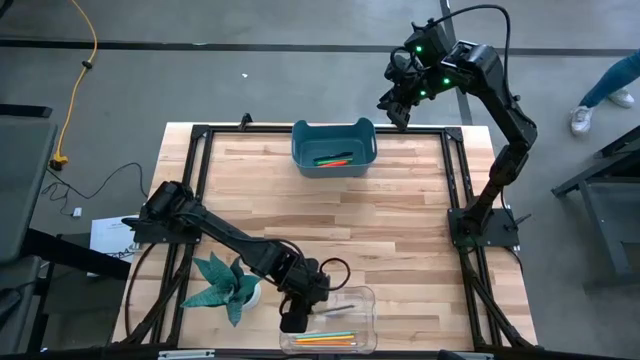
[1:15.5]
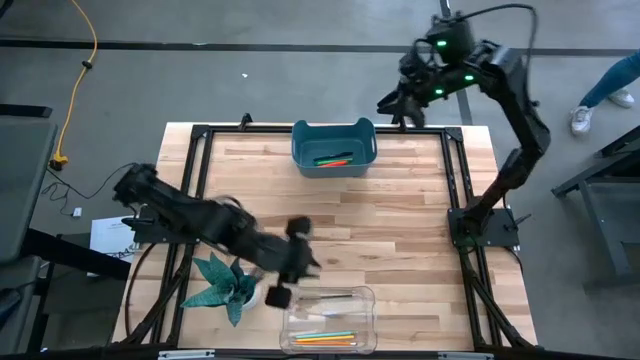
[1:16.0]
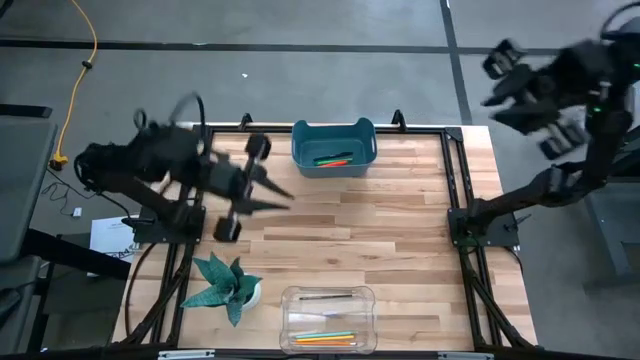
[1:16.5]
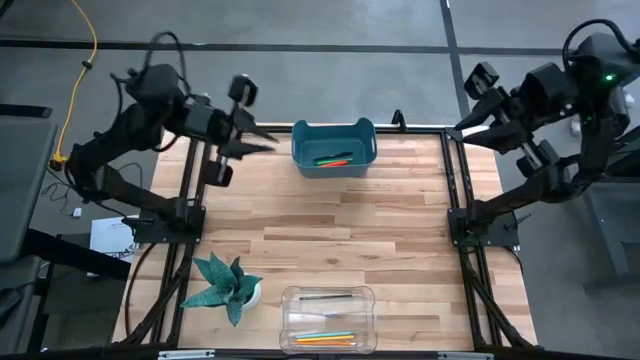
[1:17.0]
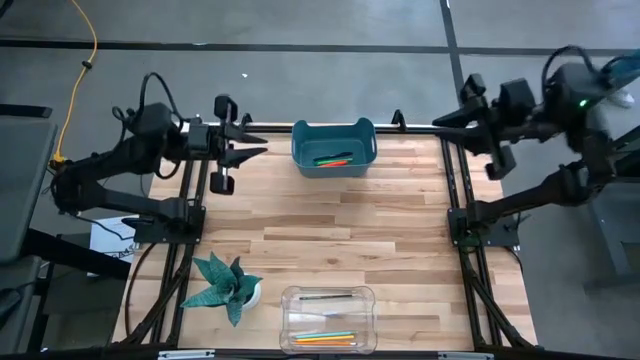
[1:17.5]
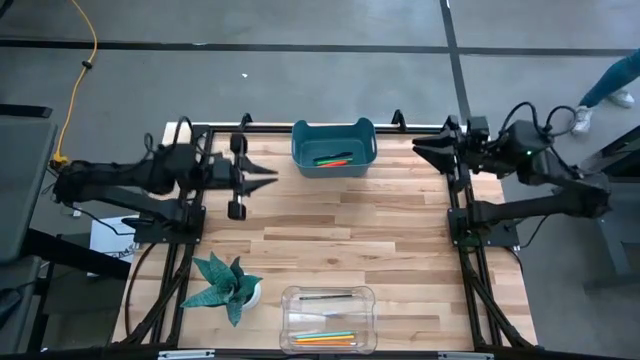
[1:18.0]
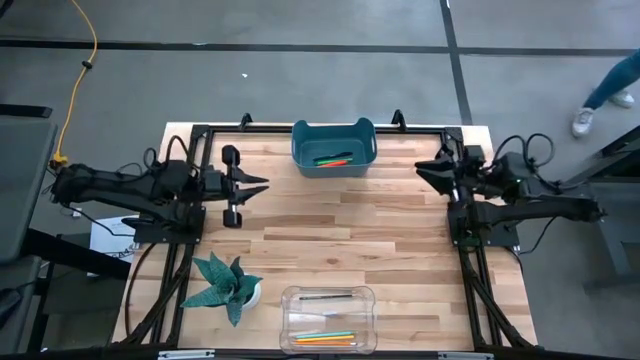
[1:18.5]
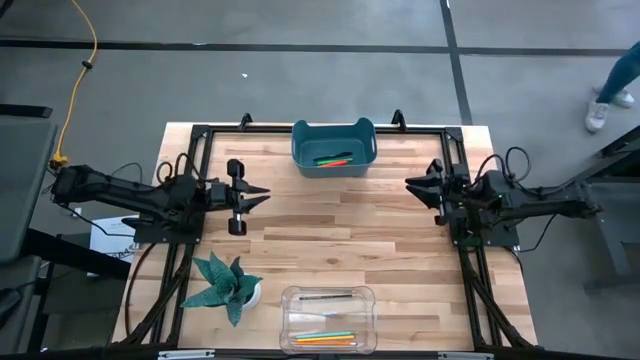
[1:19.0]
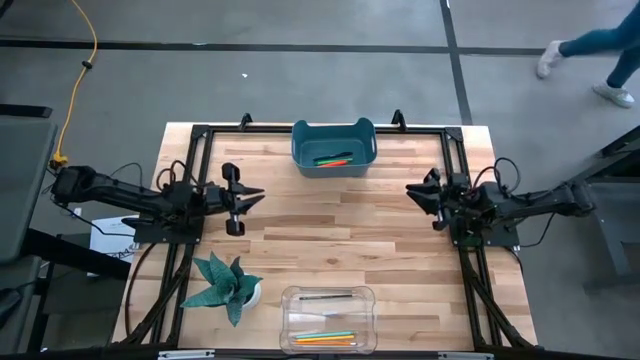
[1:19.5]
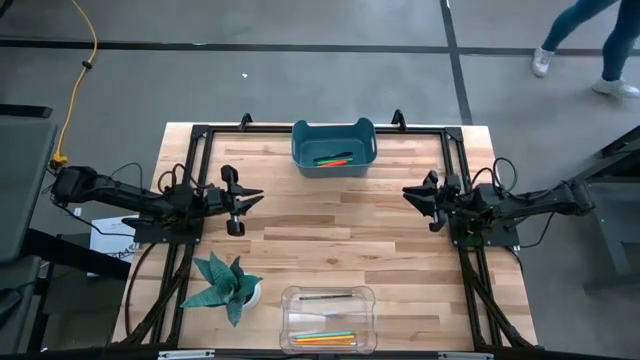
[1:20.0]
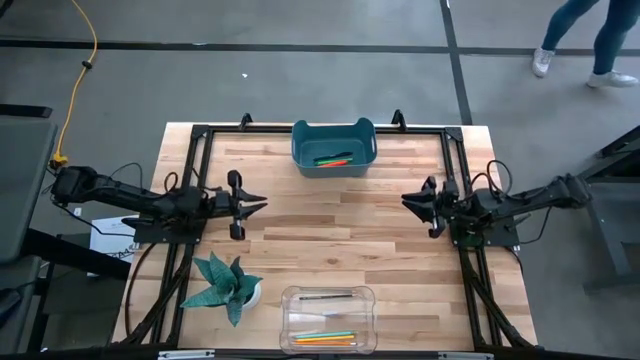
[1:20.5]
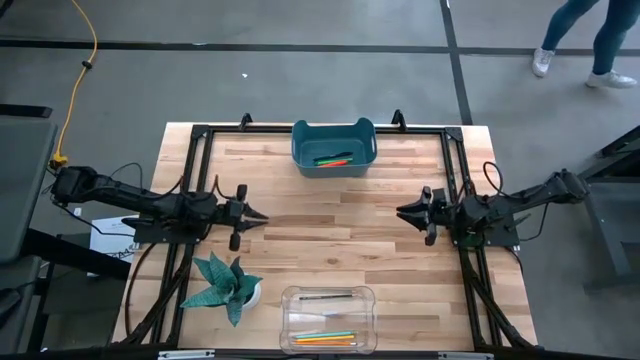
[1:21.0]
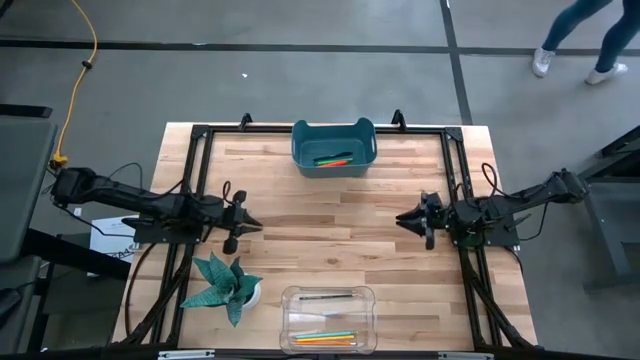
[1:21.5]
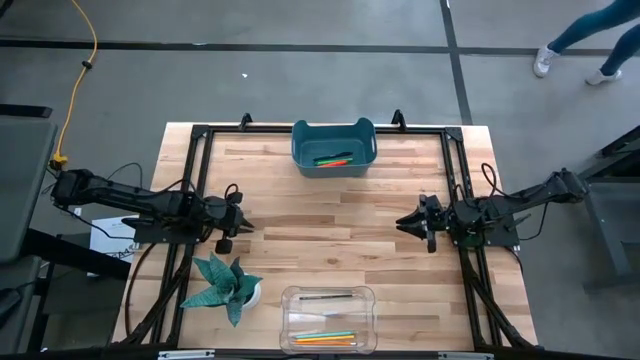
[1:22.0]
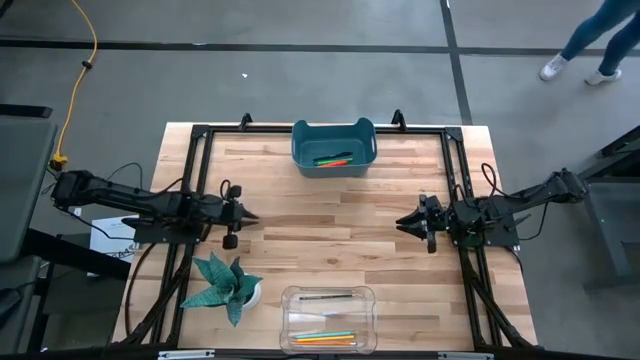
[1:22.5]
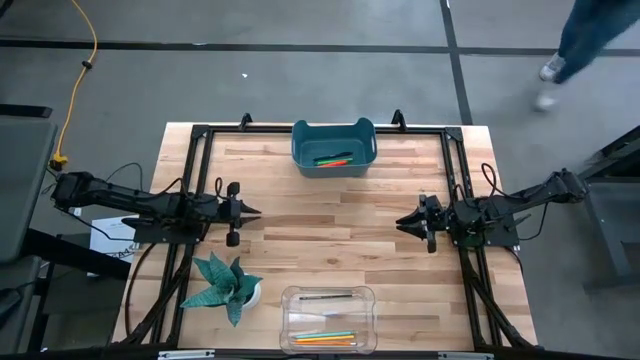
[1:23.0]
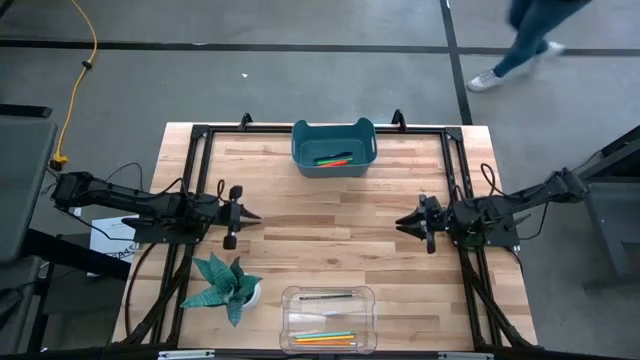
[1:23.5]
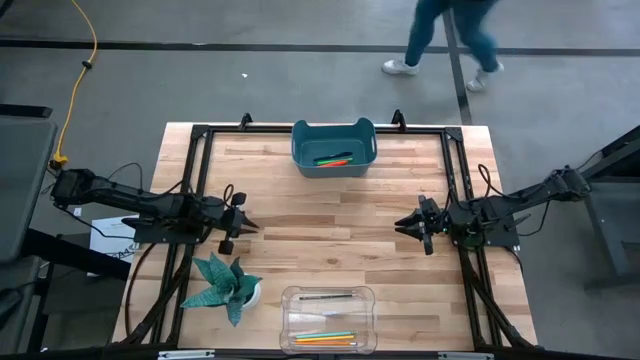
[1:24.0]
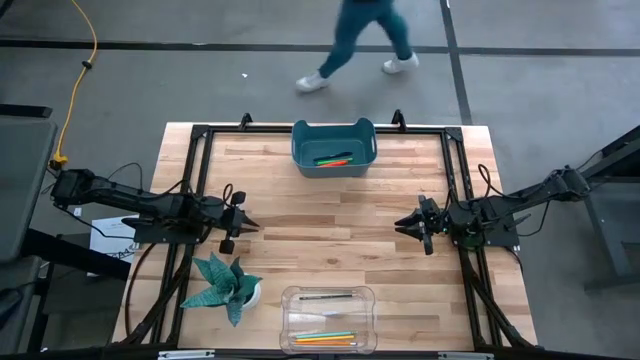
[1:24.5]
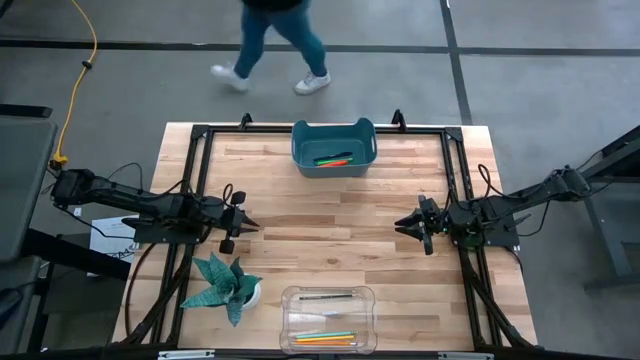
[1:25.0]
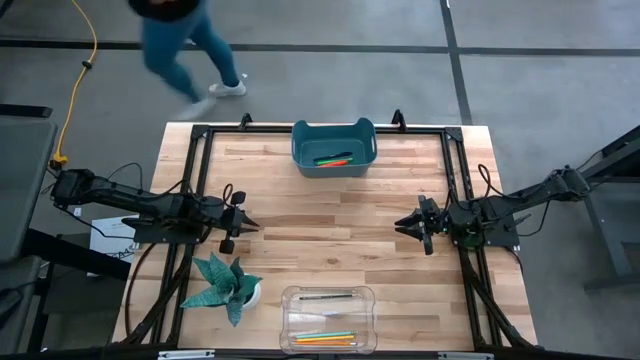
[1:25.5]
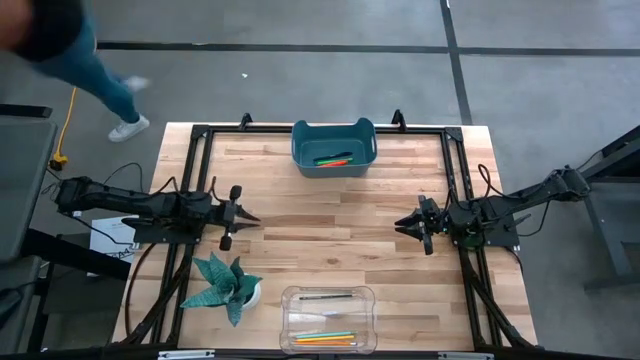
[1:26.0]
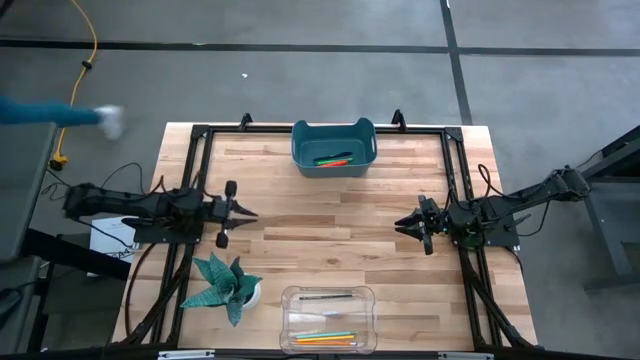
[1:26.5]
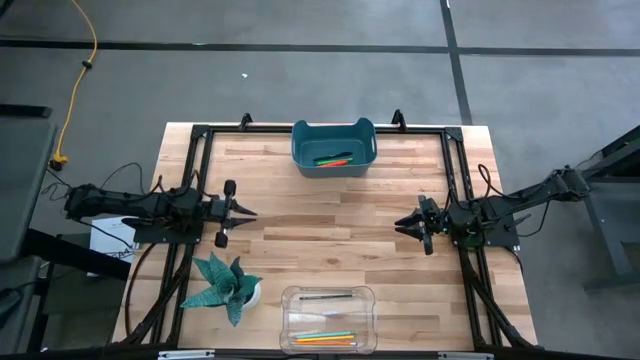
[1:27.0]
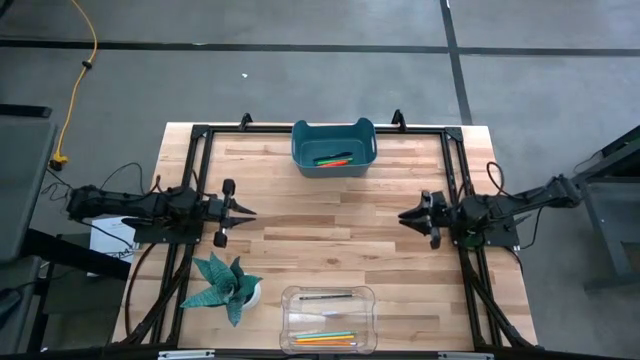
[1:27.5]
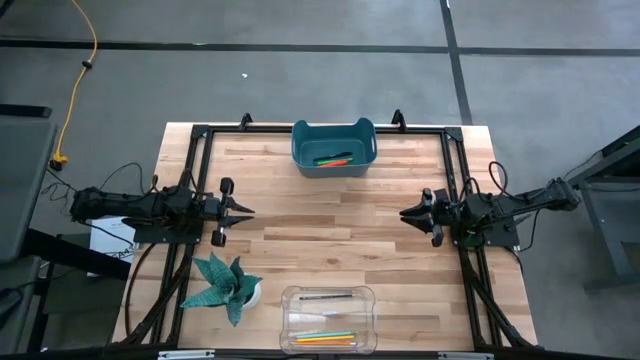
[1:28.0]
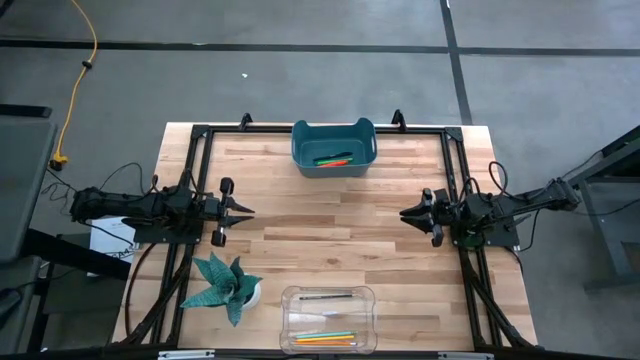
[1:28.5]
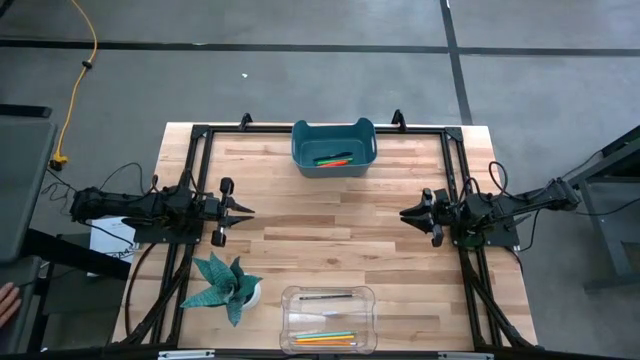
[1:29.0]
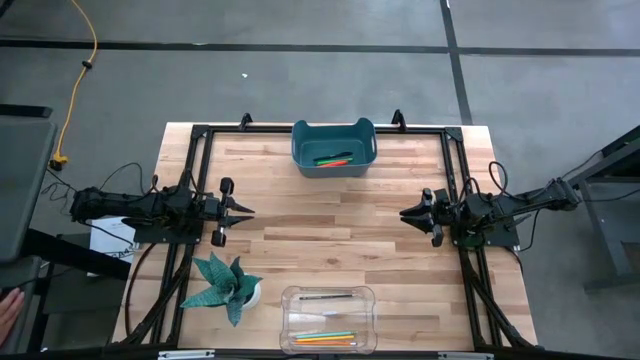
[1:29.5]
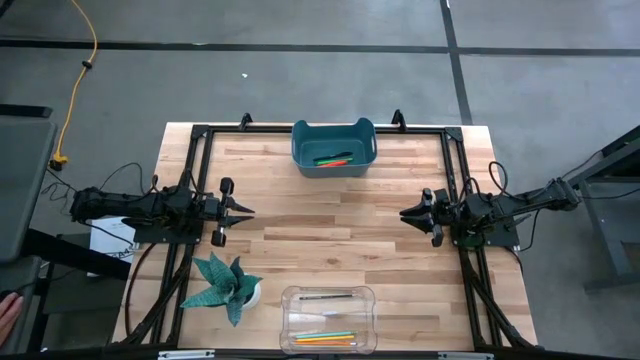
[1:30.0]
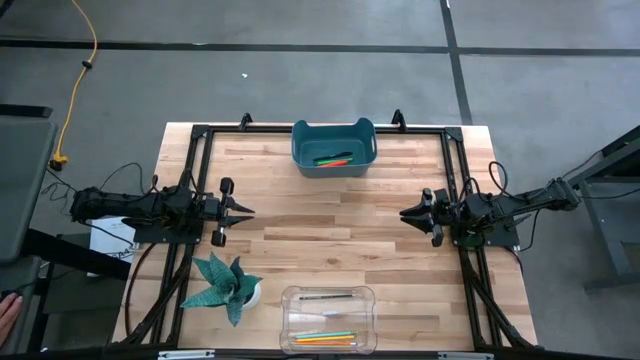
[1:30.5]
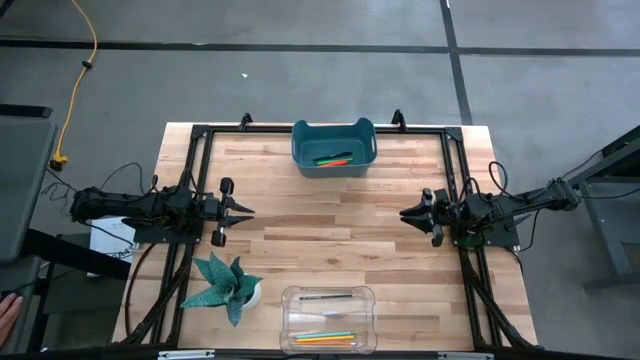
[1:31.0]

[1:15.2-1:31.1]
Task: Sort pens & pencils
Return to Home Position

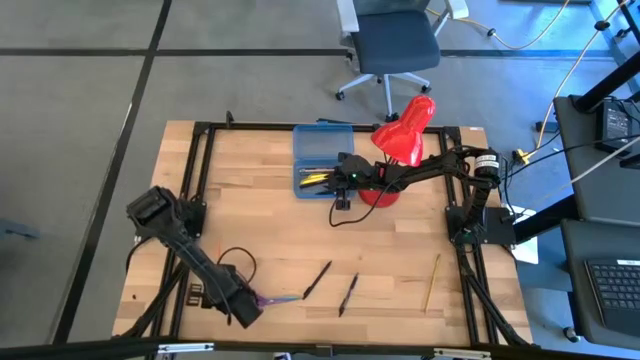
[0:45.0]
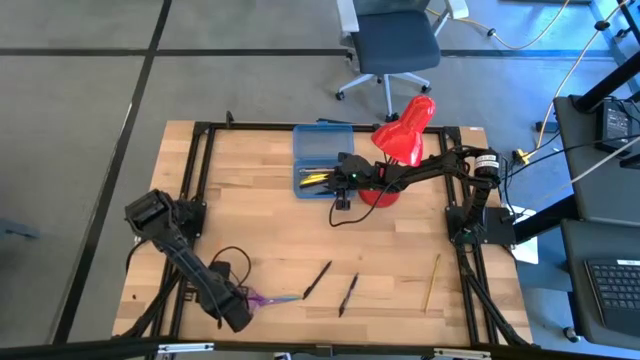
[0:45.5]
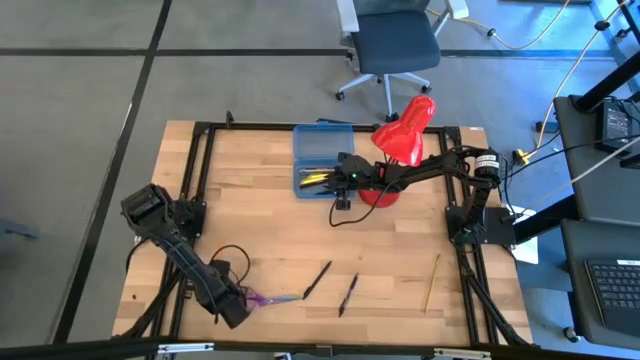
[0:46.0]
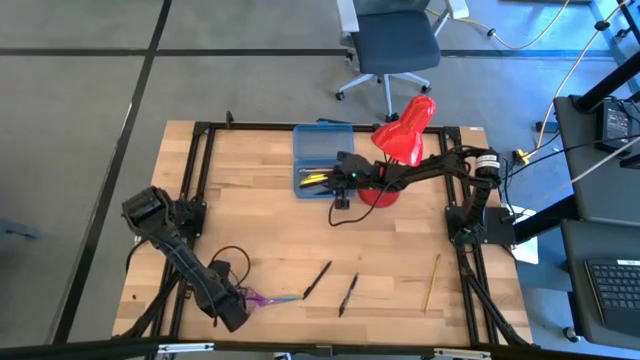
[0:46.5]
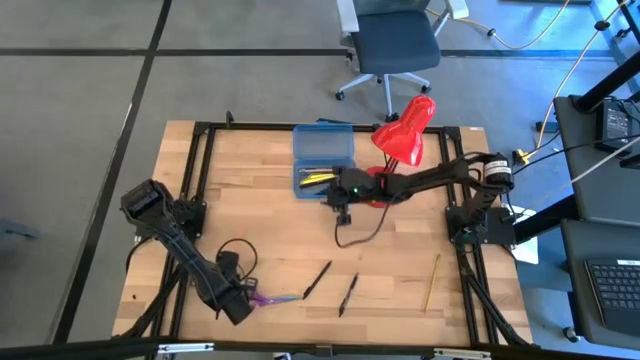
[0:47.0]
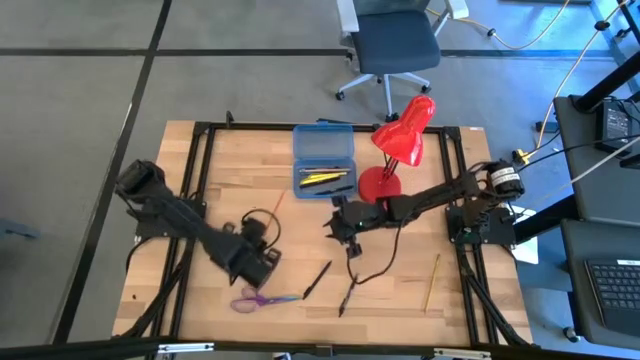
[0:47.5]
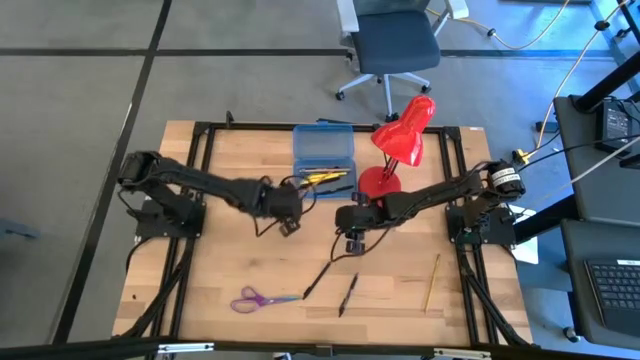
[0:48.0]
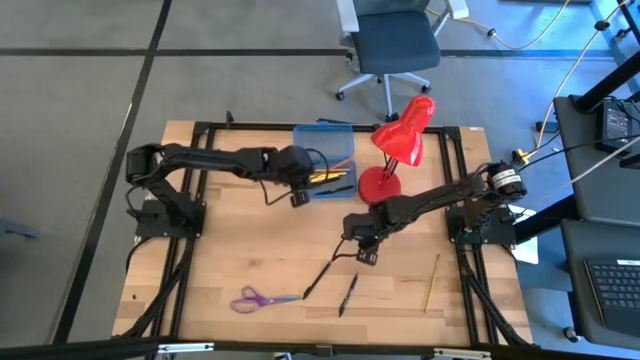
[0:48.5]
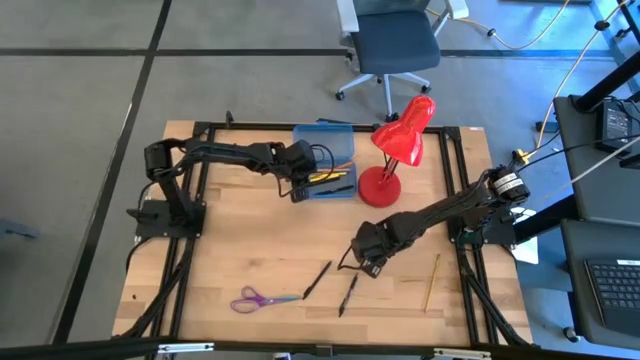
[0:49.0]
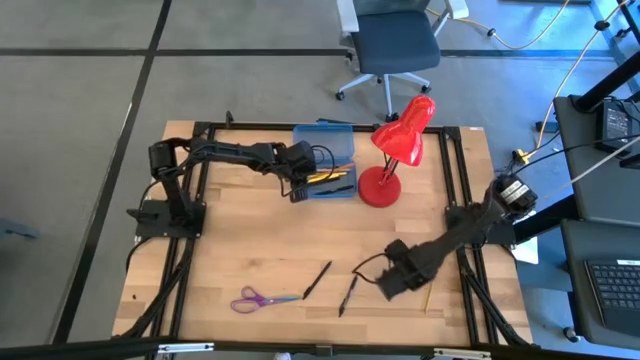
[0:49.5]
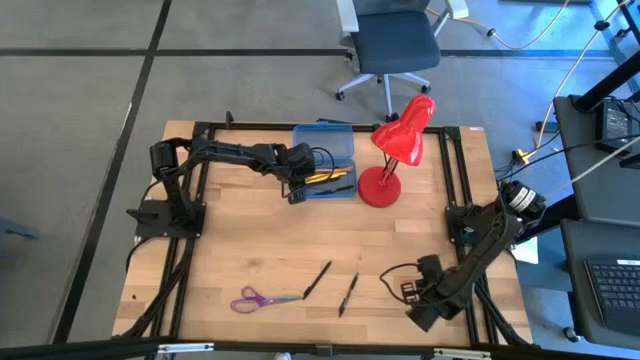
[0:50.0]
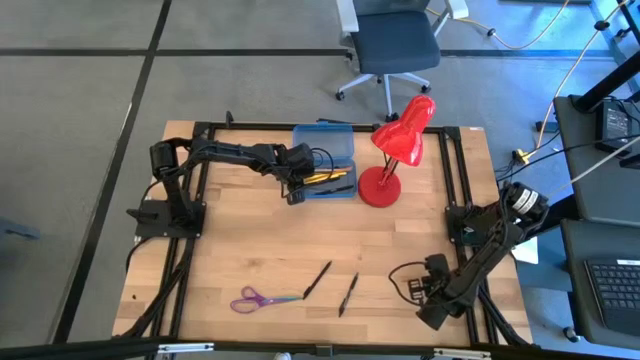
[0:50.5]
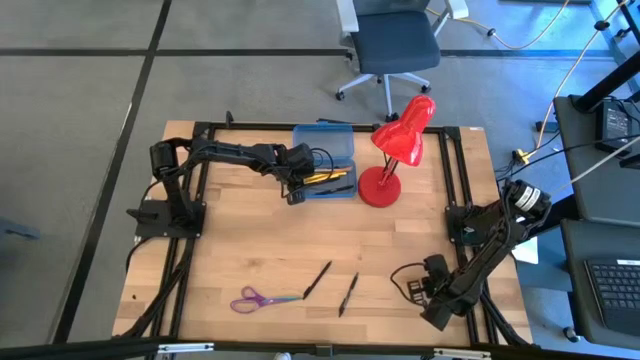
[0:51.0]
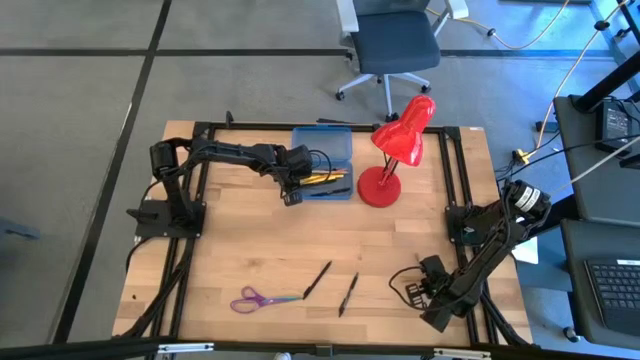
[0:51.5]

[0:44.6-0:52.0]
Task: Pick & place school supplies into a supply box
Put the orange pencil into the blue supply box
